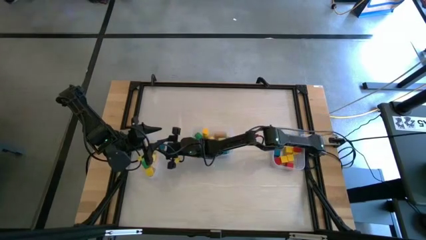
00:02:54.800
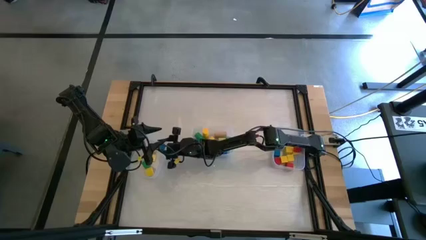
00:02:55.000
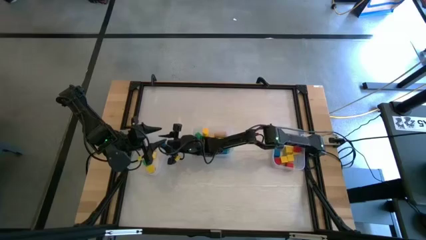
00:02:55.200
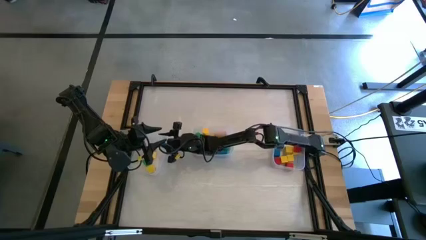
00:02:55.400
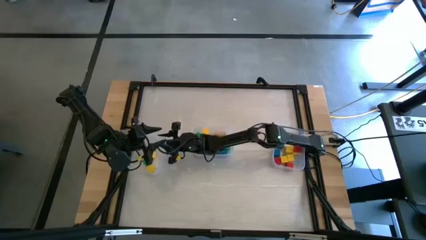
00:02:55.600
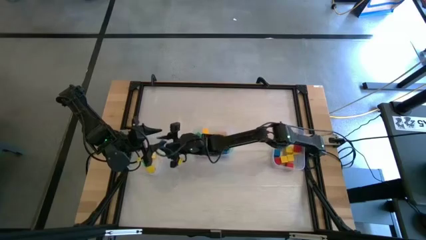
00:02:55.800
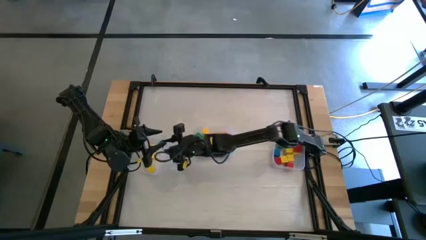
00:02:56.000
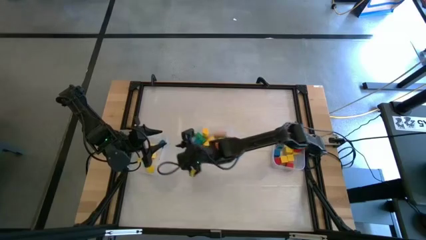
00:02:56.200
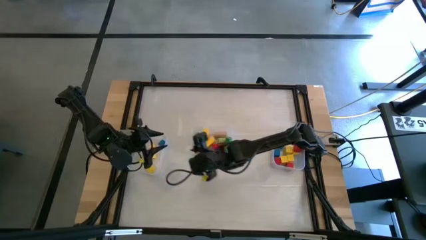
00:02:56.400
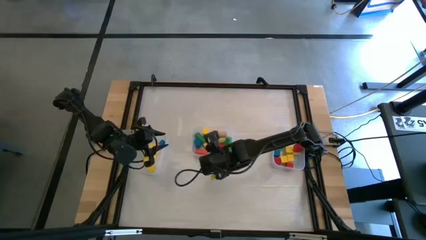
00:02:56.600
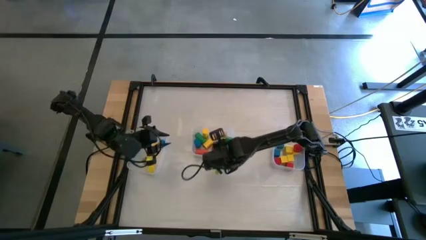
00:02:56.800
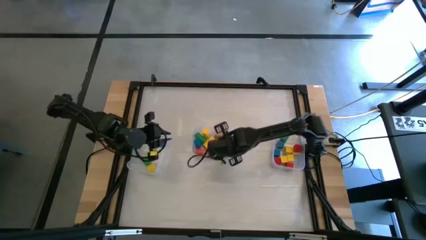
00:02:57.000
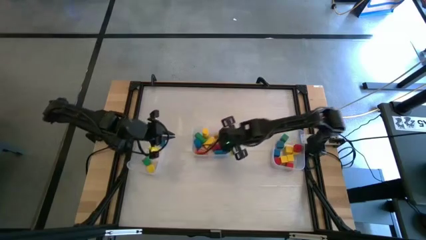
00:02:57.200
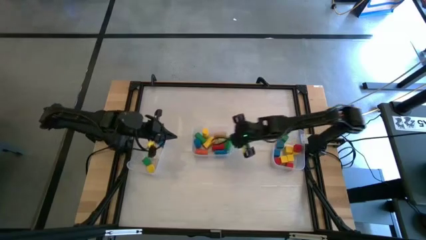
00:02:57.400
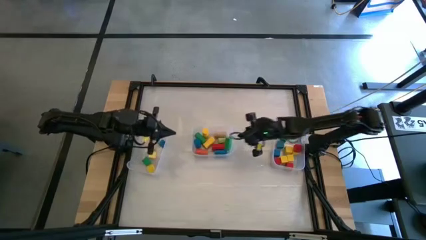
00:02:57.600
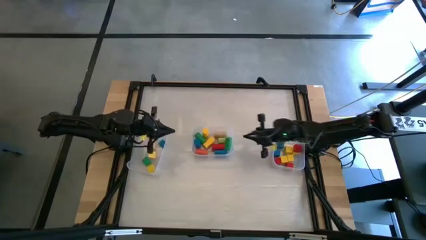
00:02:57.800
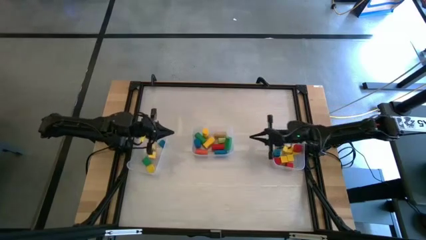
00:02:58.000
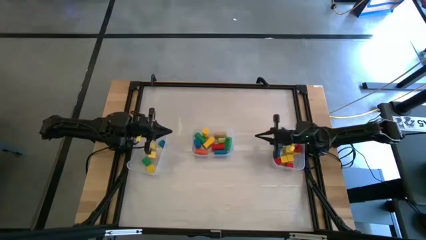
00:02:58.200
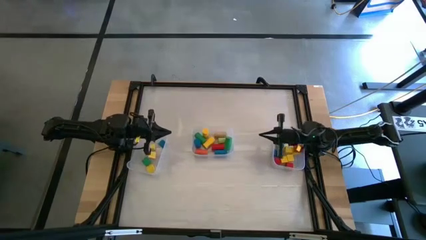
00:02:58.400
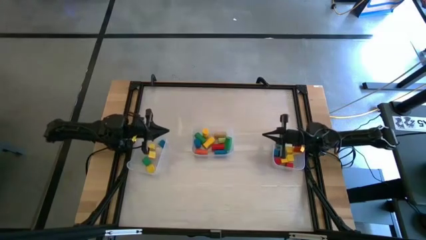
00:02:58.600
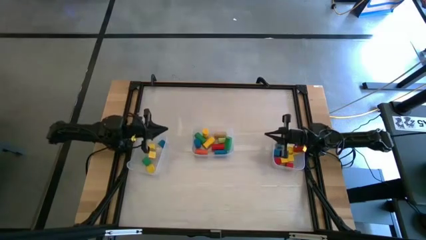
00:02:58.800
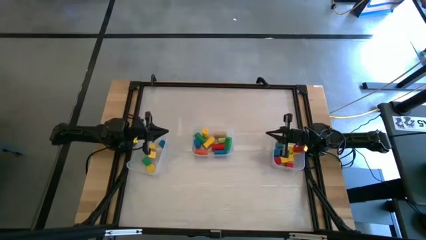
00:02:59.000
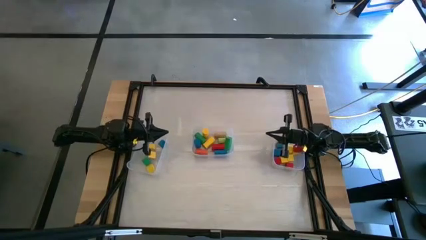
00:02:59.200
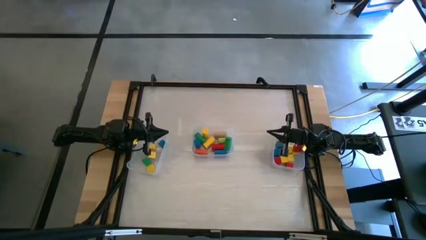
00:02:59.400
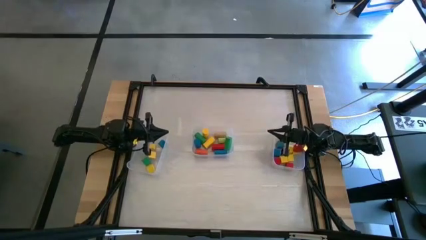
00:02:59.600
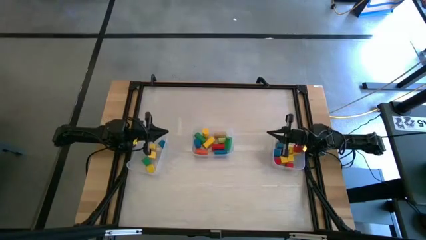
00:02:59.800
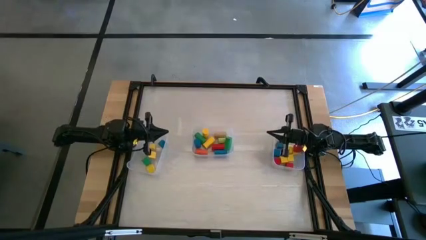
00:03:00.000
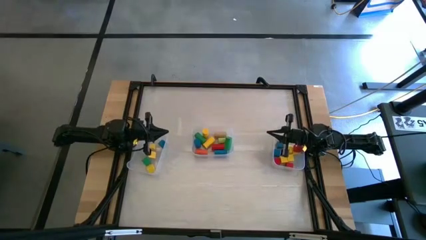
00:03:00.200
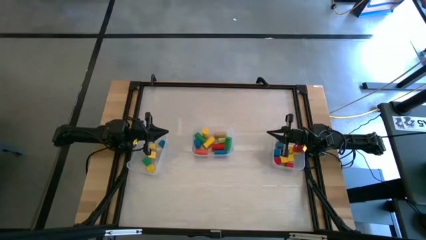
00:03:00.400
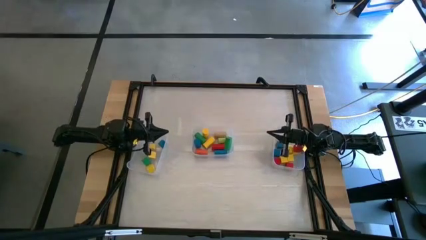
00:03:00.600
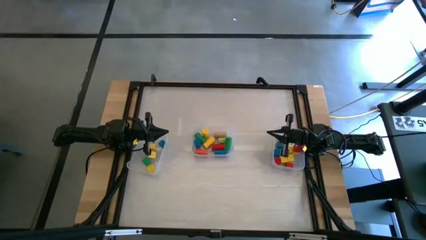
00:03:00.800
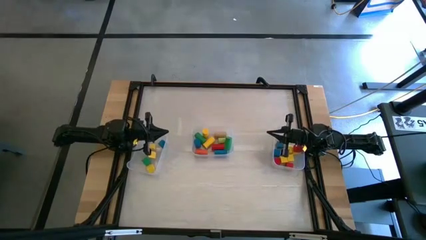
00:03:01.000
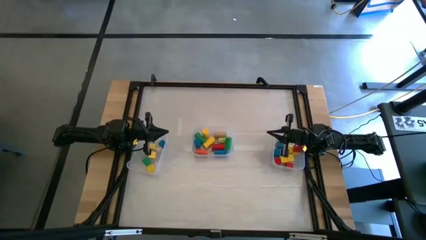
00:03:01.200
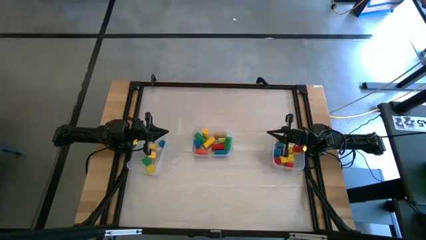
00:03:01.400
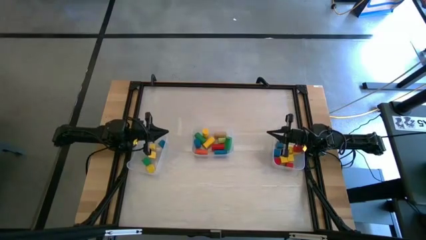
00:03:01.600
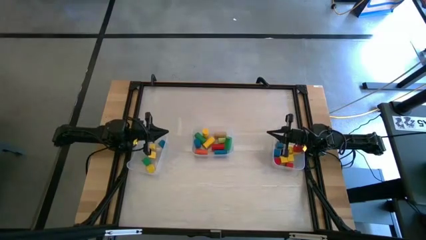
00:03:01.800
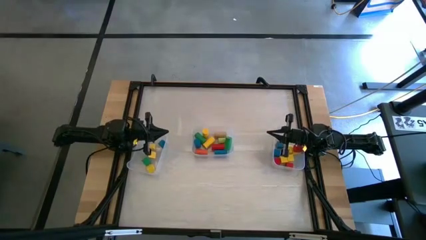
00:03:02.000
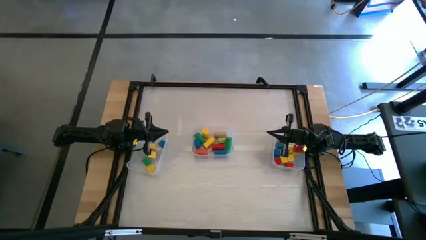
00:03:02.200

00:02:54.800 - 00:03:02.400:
Task: Sort blocks by size
Return to Home Position

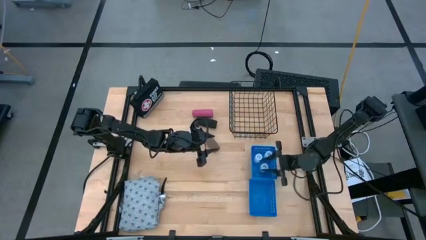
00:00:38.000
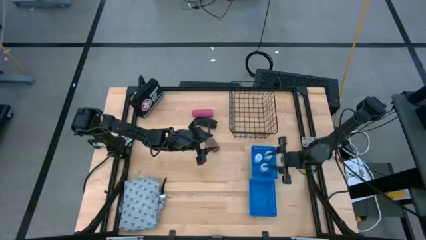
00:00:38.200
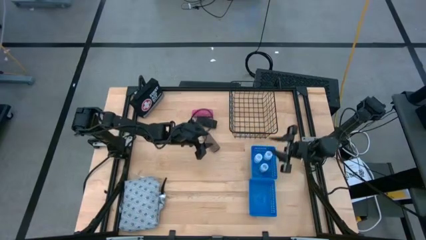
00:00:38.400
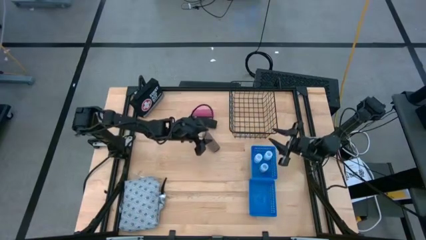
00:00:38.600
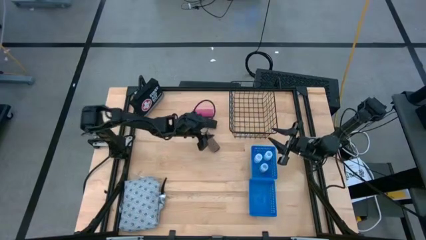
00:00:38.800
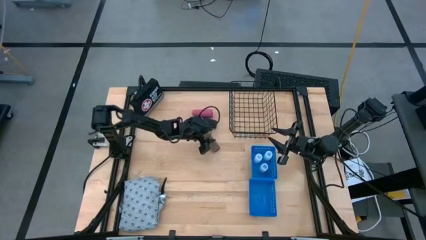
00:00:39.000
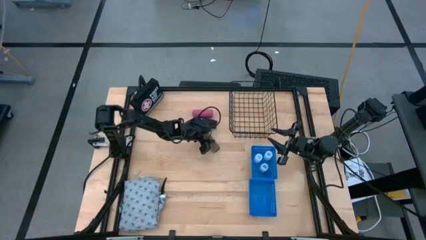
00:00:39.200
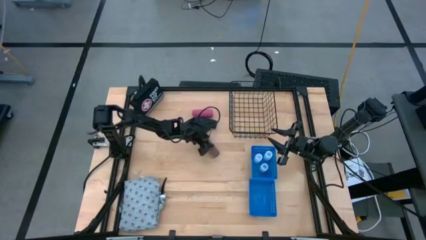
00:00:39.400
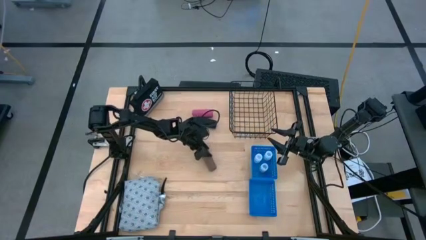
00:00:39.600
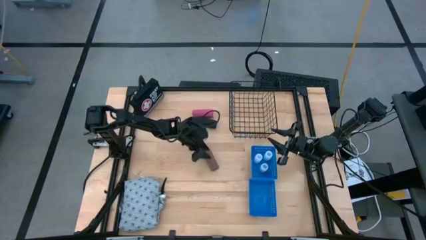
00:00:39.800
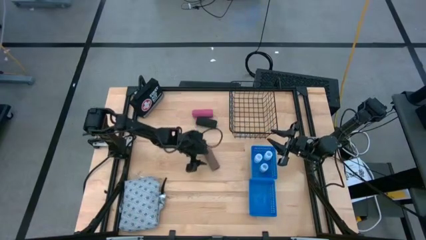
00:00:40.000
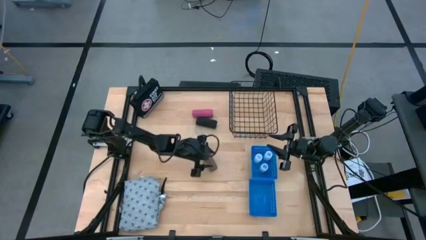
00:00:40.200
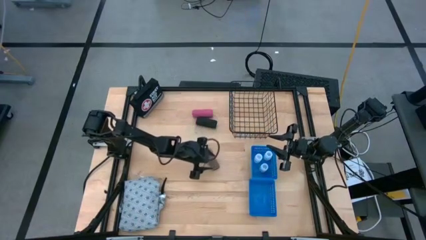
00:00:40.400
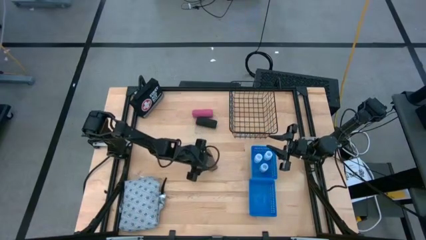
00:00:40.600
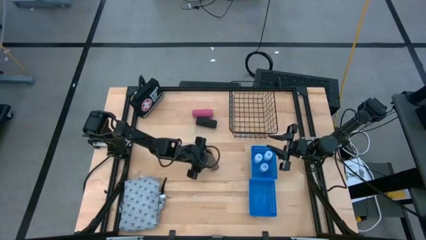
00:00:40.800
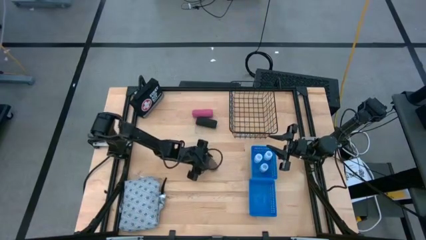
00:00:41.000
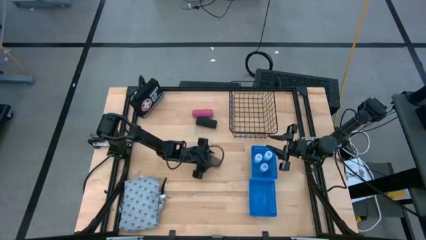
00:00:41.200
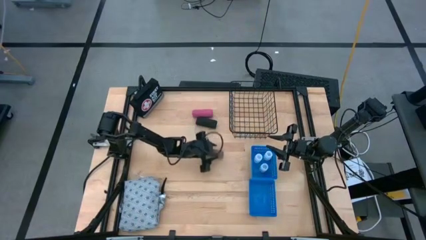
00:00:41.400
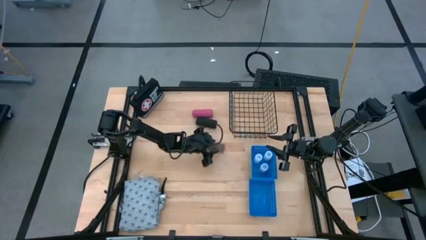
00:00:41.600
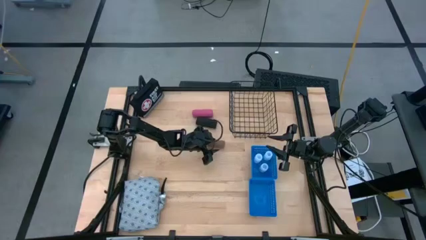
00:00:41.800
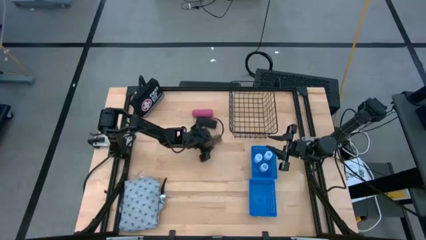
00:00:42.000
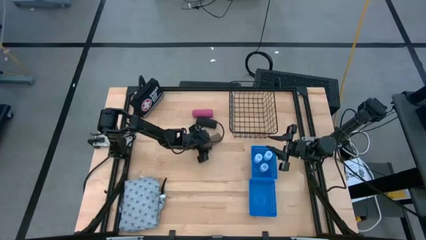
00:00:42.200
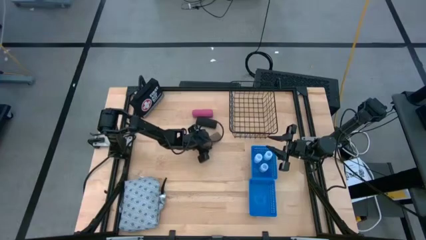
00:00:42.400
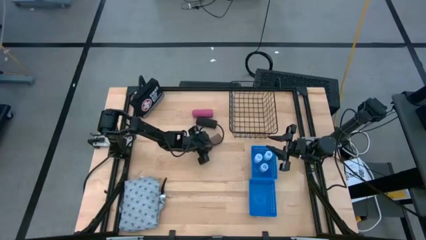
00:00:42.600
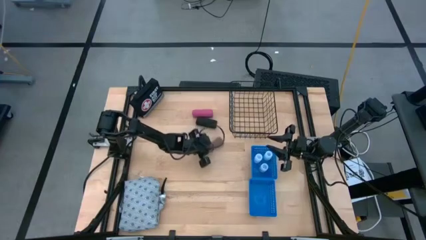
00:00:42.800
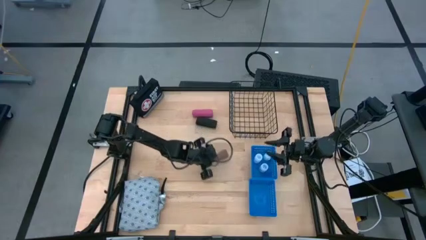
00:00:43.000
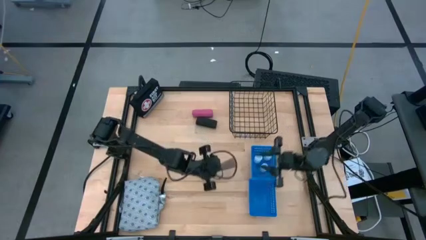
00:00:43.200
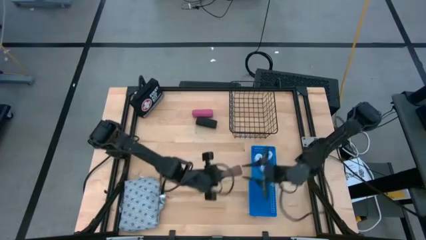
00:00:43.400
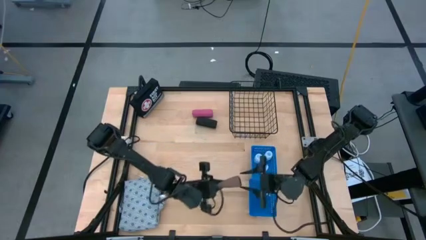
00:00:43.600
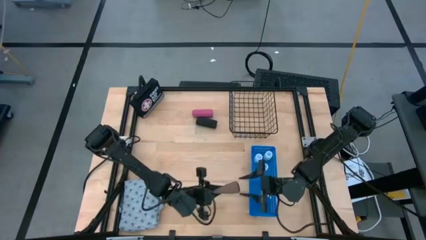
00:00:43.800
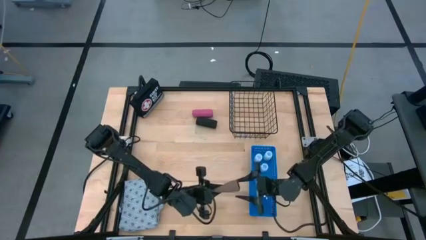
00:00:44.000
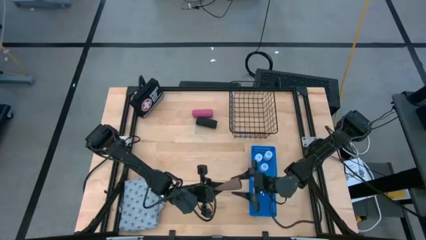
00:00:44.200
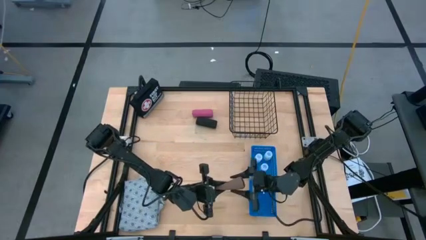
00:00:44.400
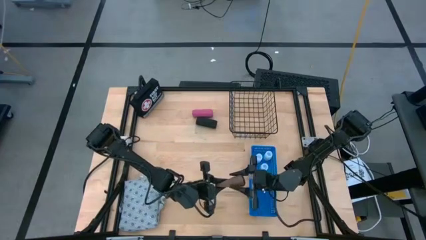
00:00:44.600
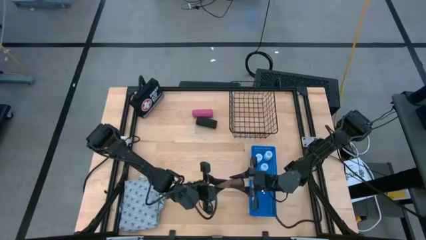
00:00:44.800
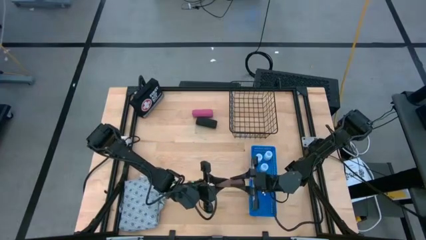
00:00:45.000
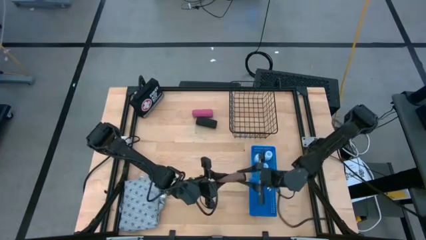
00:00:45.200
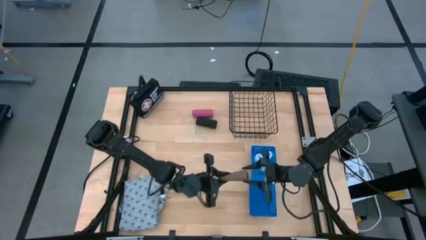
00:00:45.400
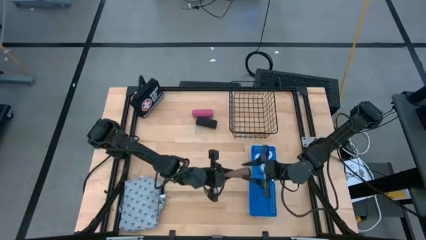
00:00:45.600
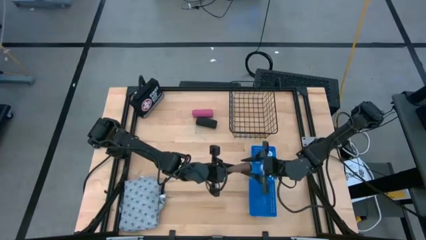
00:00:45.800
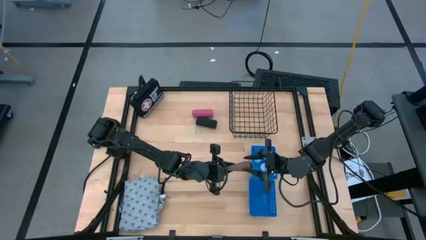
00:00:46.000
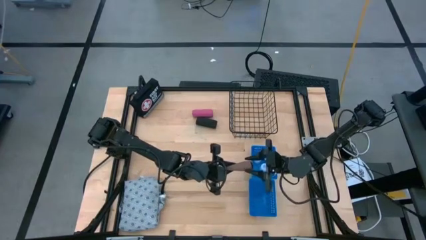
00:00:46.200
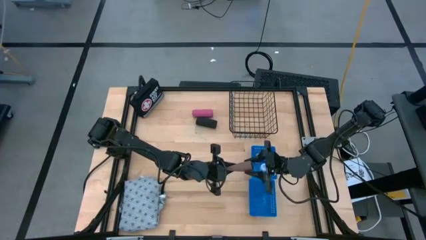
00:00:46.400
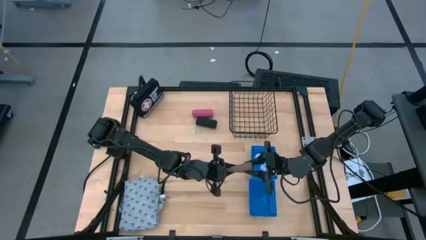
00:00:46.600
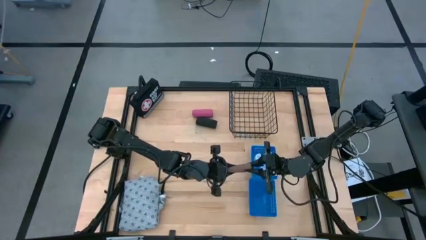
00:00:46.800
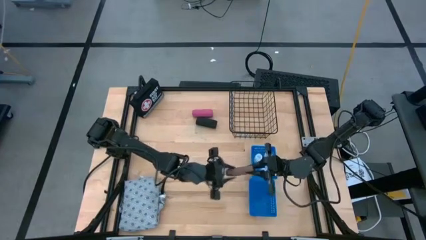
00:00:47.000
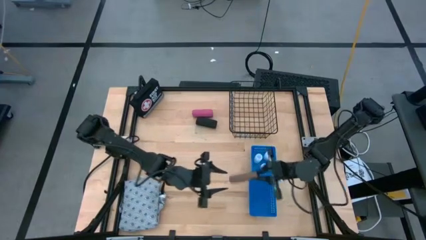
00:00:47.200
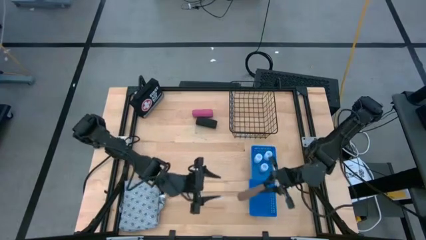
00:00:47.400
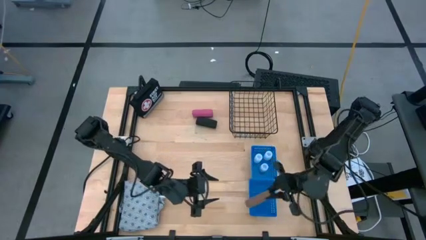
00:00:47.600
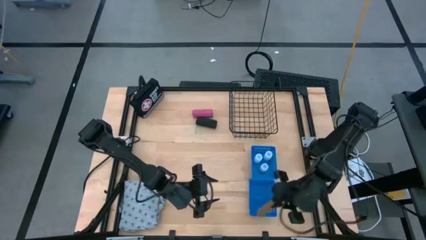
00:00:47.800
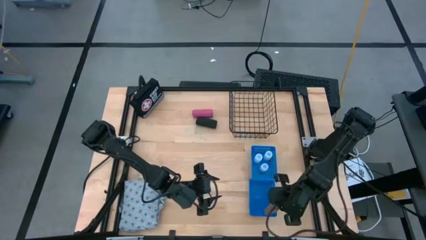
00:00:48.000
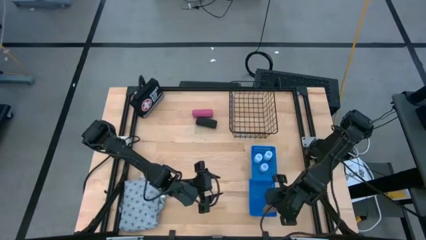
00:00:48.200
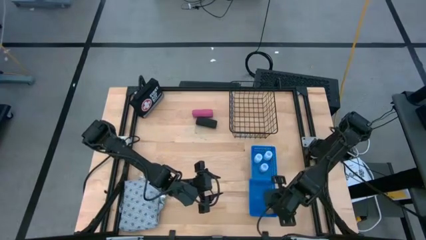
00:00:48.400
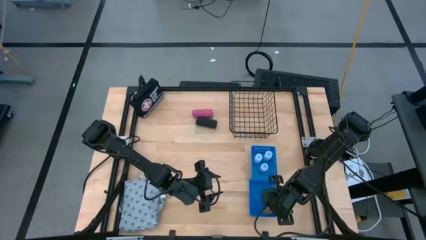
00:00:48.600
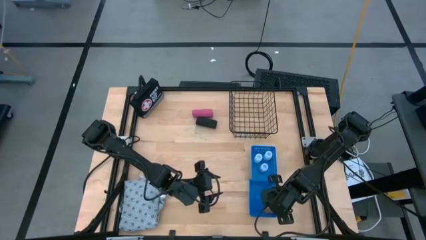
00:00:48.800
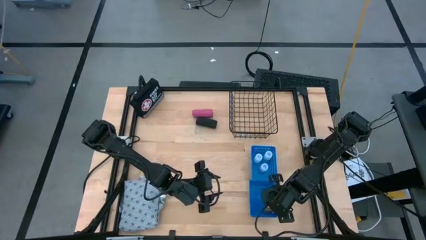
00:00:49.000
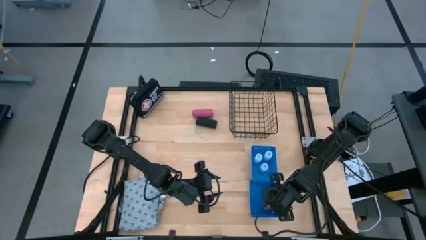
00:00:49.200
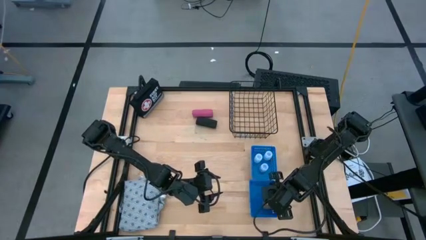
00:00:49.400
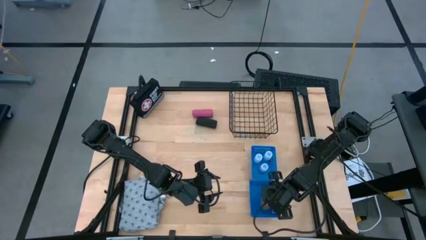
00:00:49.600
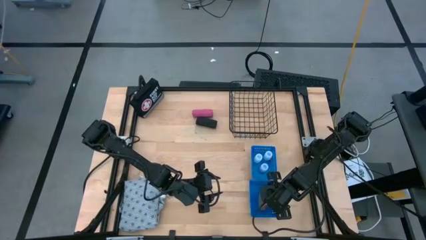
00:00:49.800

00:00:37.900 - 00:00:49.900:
Task: Pick & Place Medicine items
Put the brown bandage into the bottom blue basket
